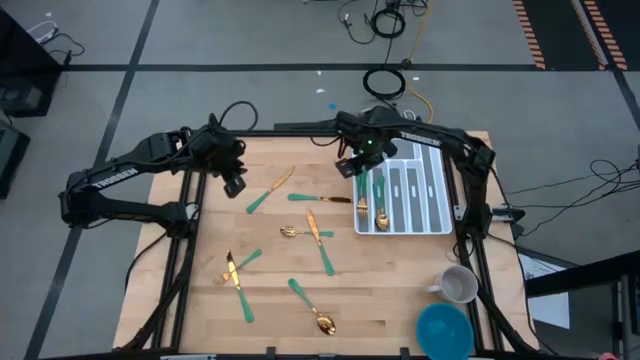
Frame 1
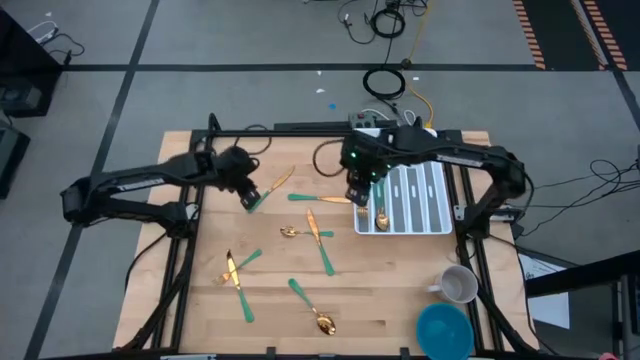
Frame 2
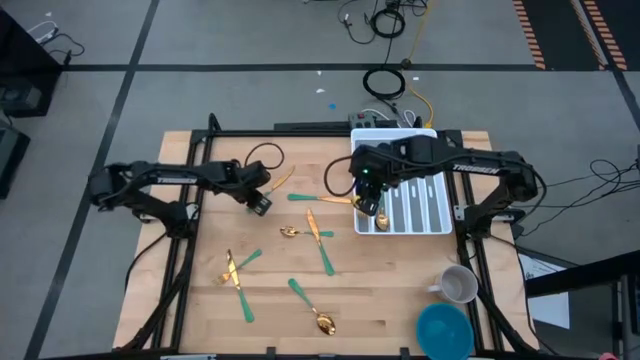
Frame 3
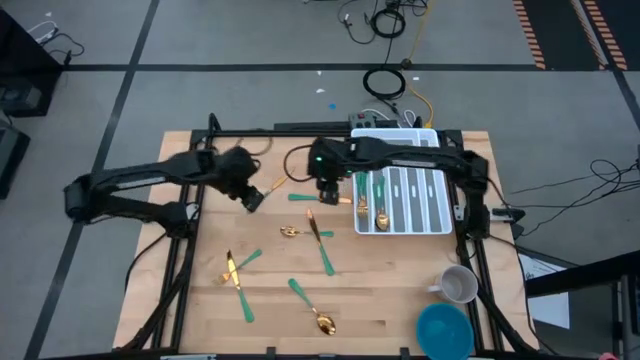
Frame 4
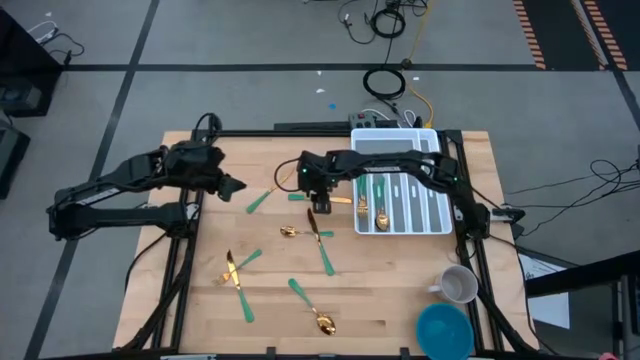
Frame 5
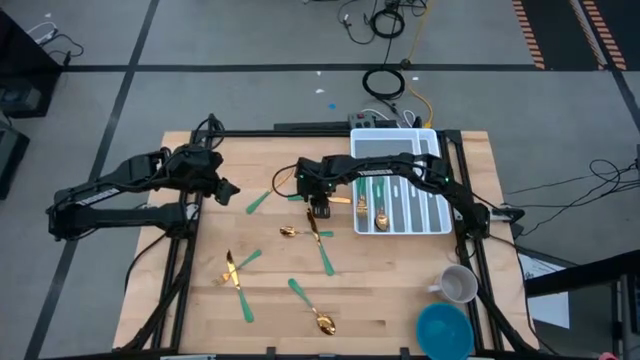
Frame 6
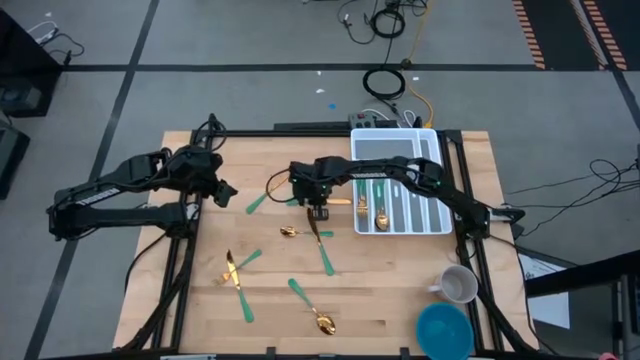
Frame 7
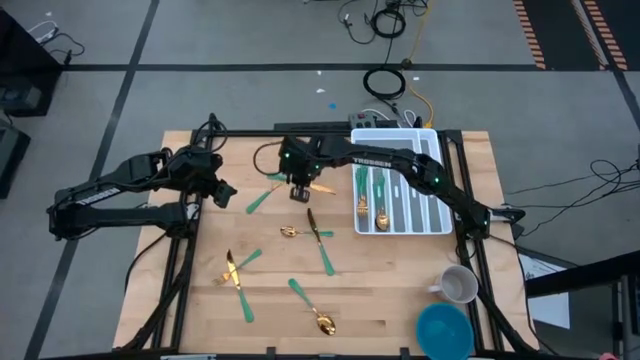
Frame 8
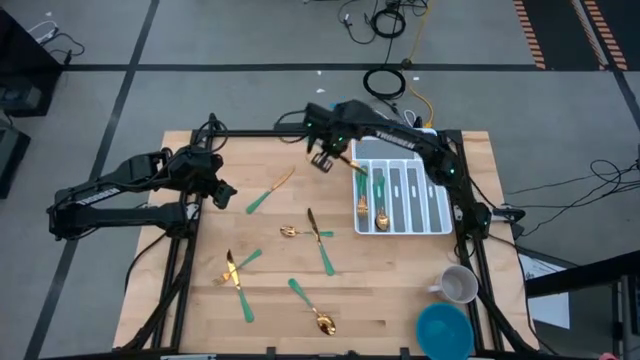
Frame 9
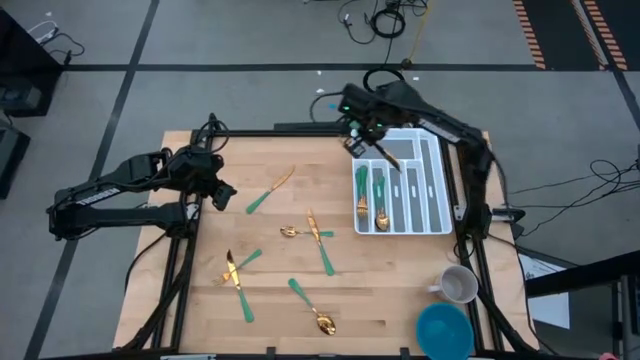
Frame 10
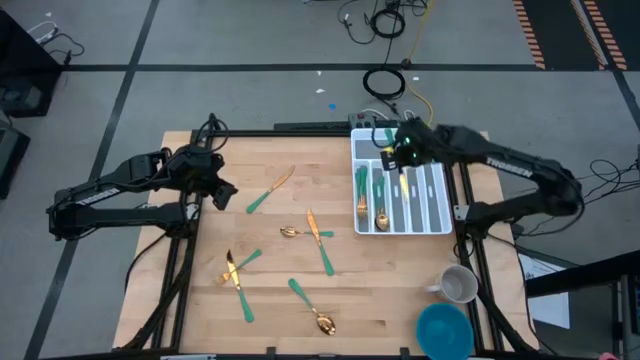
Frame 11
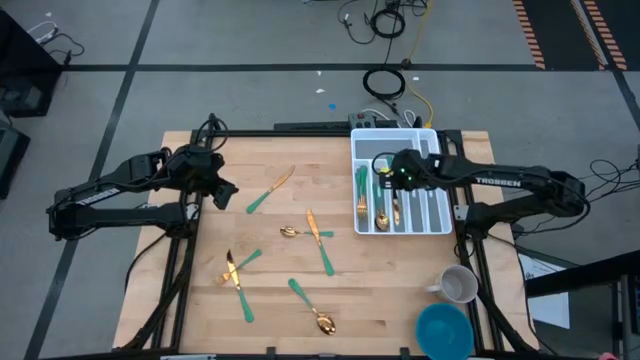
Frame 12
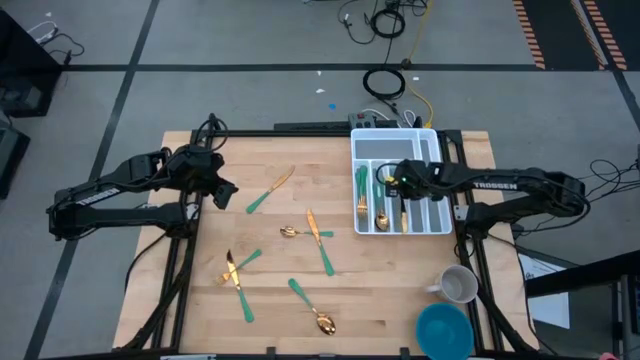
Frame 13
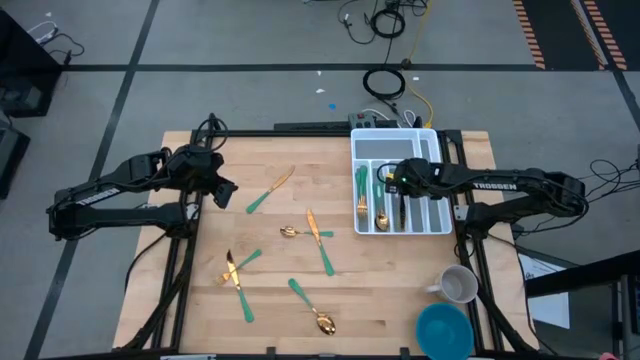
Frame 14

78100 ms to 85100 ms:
Task: Sort silverware
Put the knife into the silverware tray

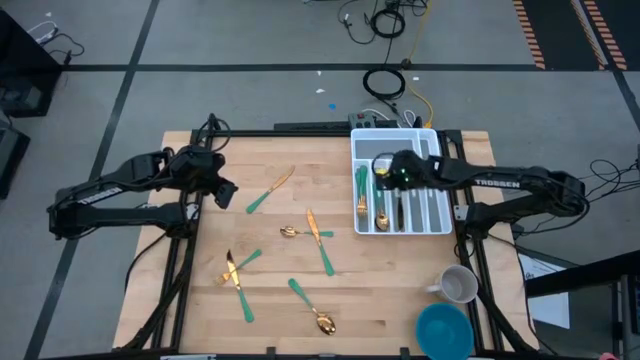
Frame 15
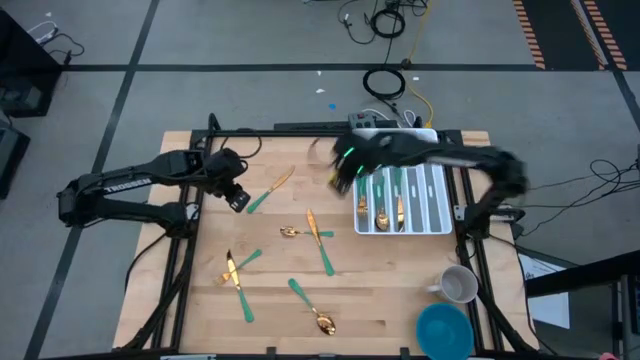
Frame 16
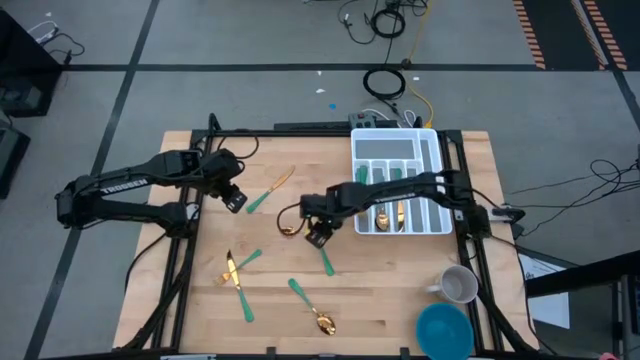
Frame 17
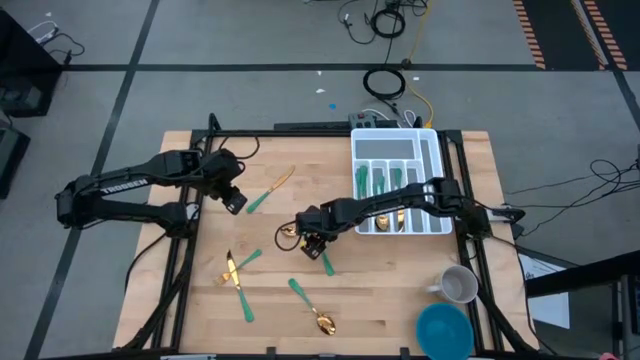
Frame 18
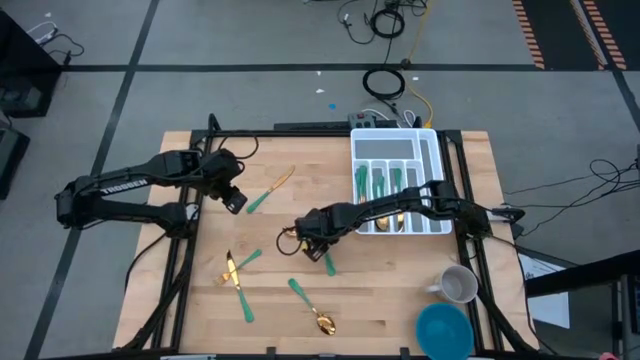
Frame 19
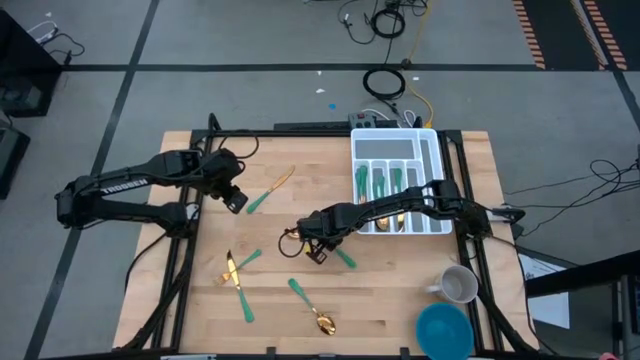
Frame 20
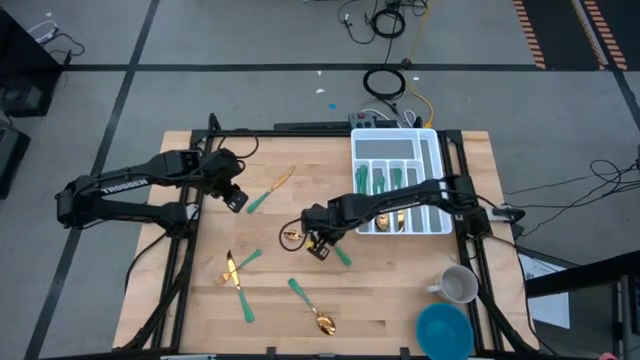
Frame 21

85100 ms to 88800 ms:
Put the knife into the silverware tray

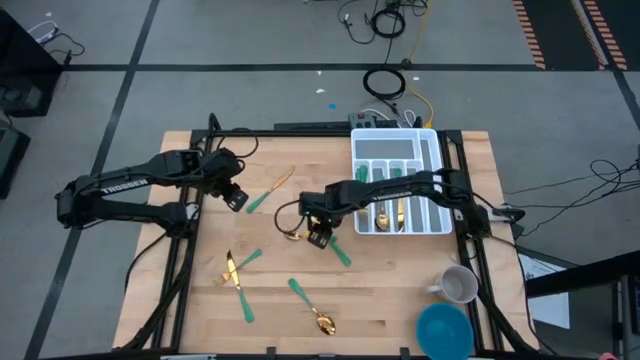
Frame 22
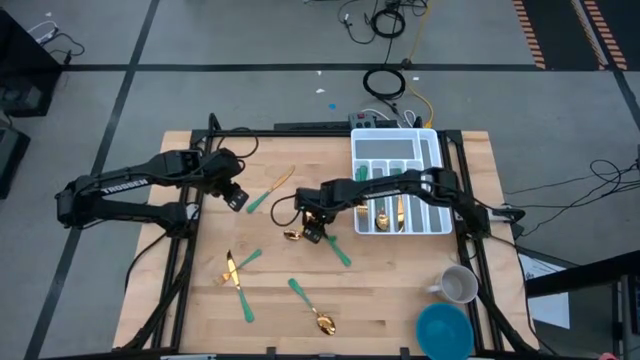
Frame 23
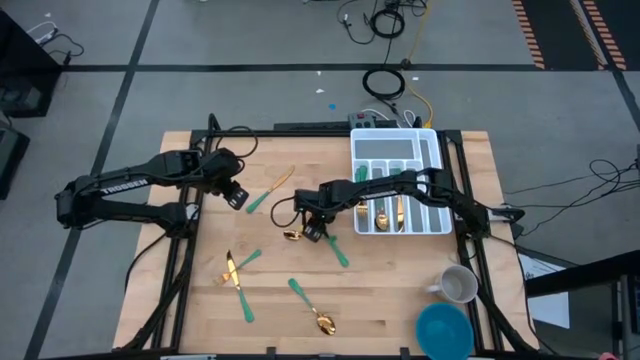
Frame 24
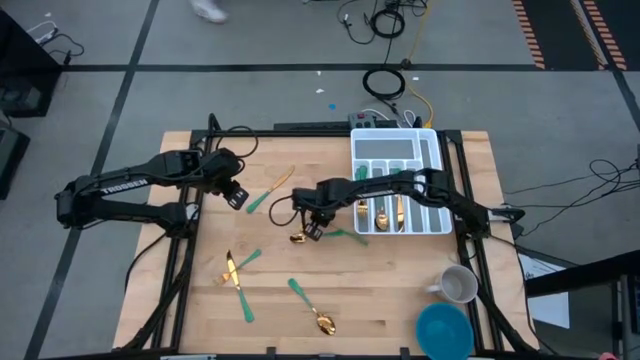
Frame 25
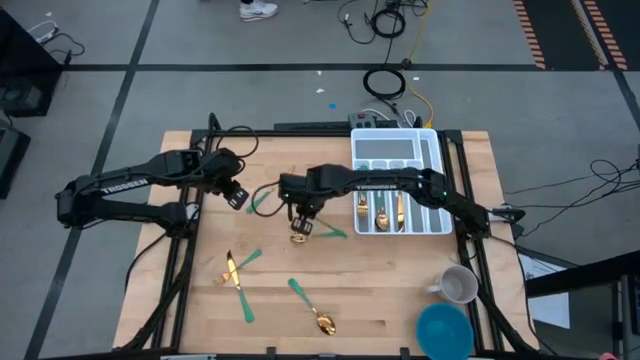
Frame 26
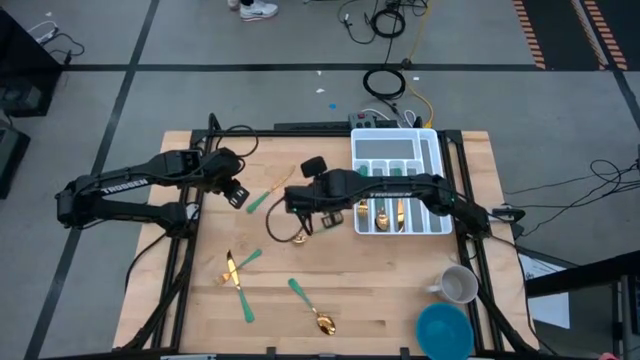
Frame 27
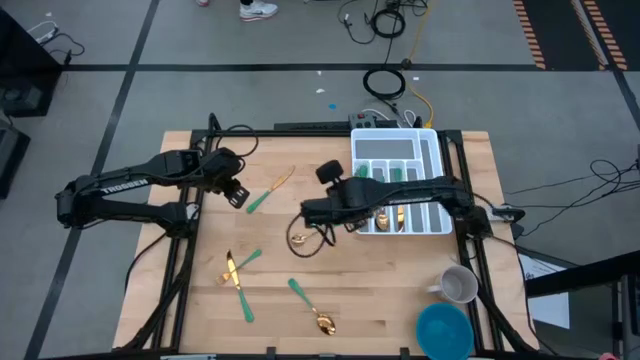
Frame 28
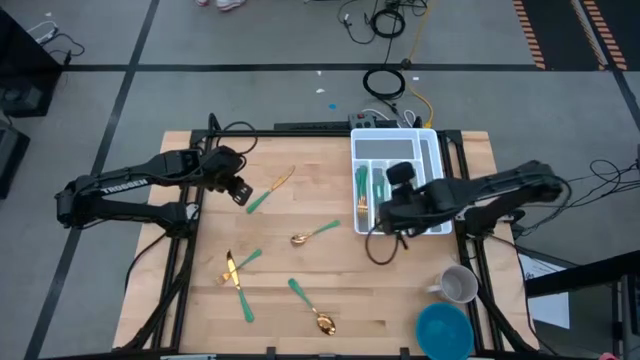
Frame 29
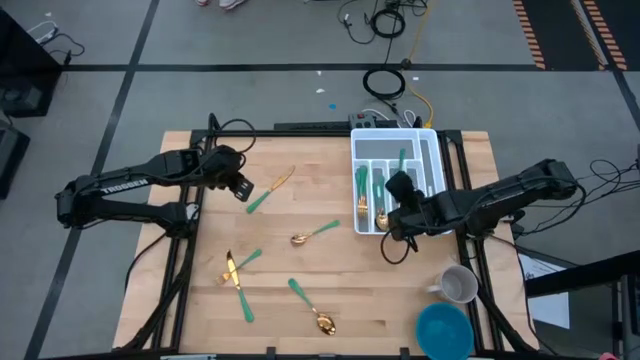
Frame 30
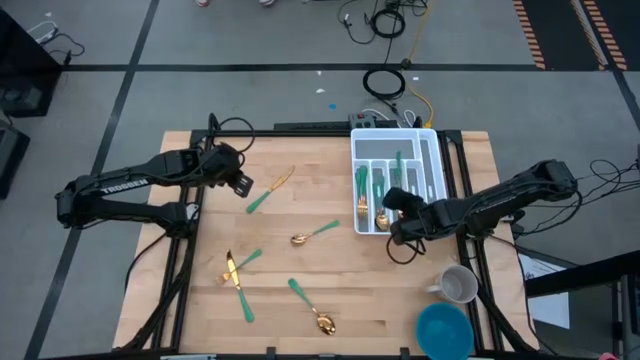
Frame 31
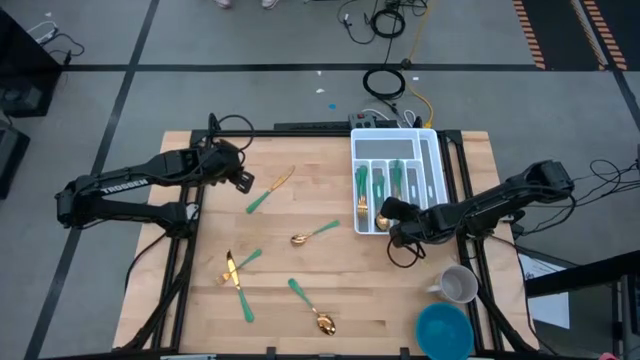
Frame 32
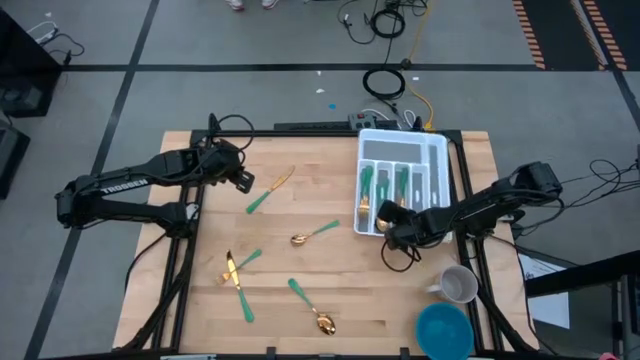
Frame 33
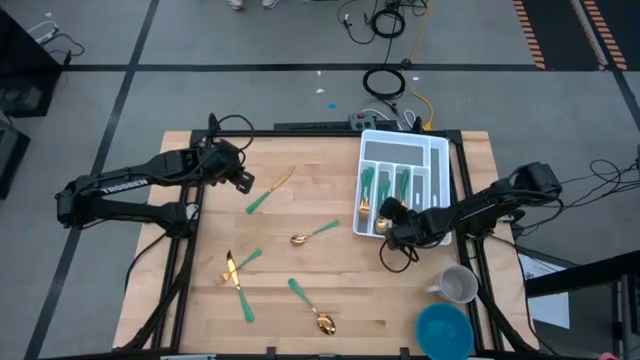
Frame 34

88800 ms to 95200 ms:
Put the knife into the silverware tray

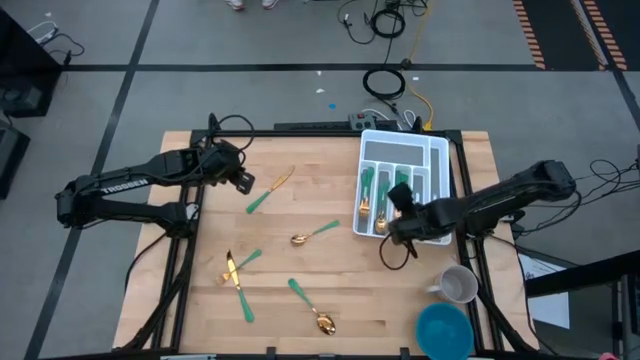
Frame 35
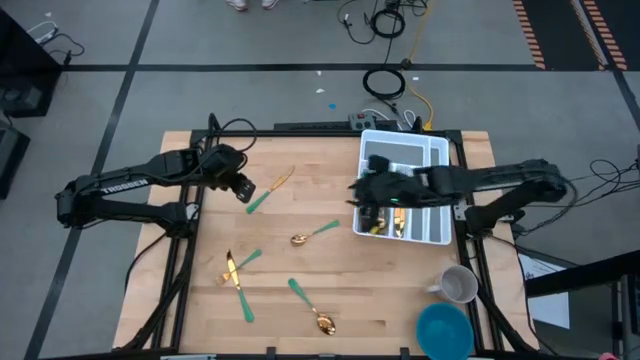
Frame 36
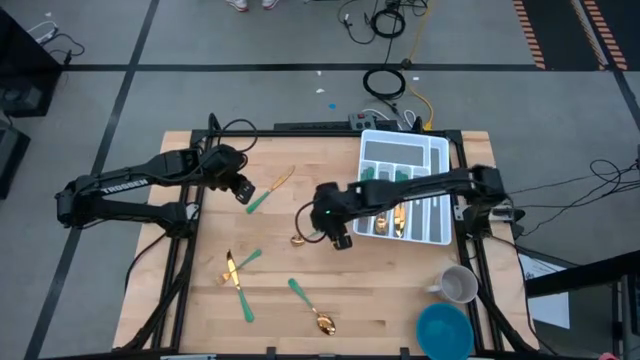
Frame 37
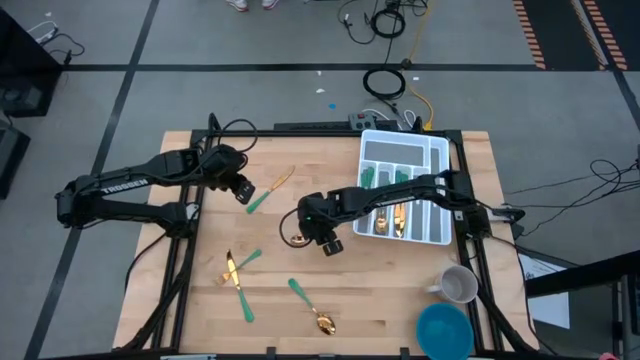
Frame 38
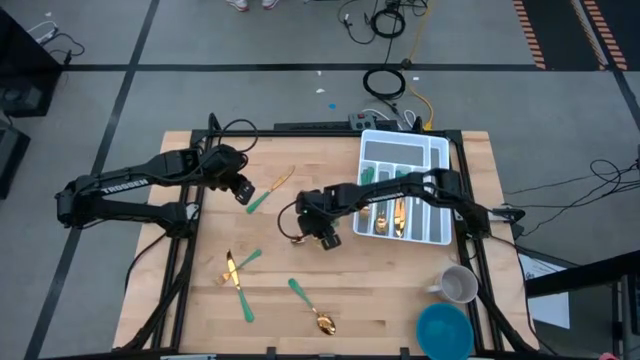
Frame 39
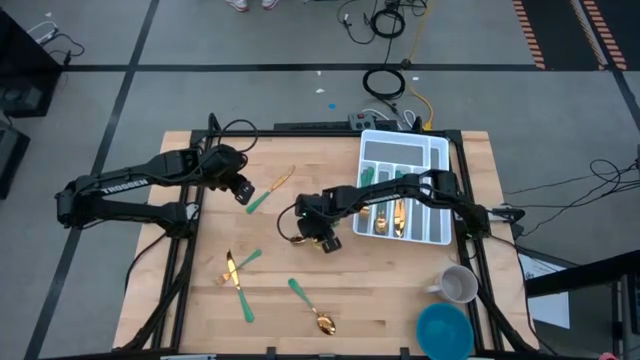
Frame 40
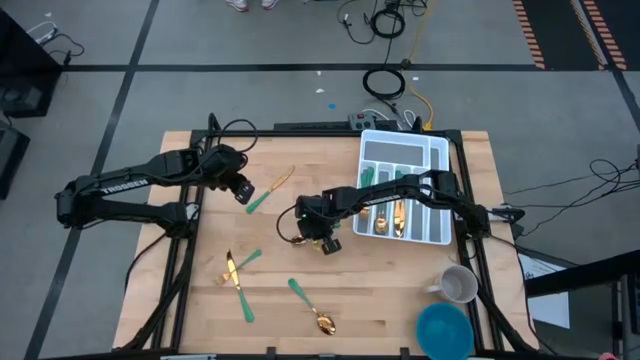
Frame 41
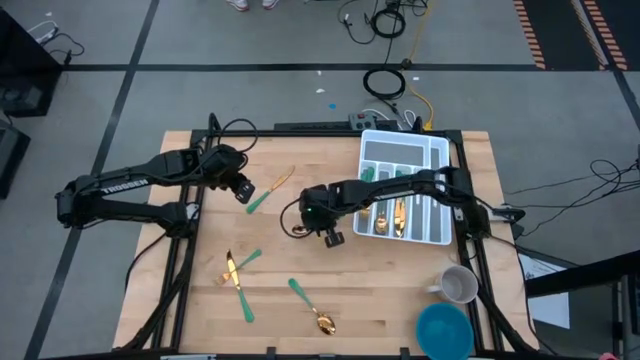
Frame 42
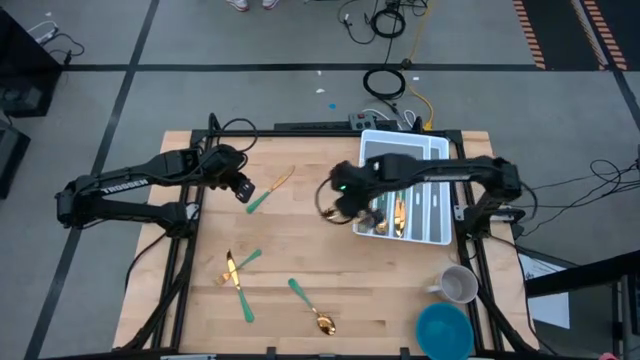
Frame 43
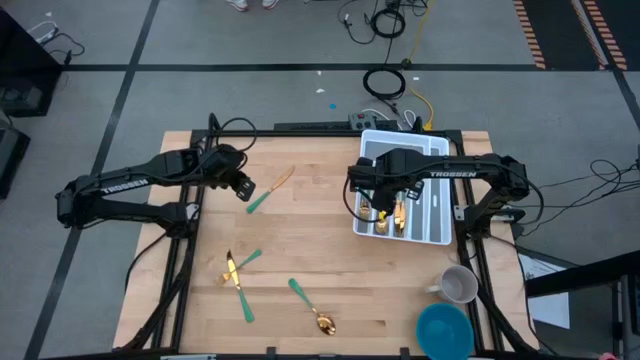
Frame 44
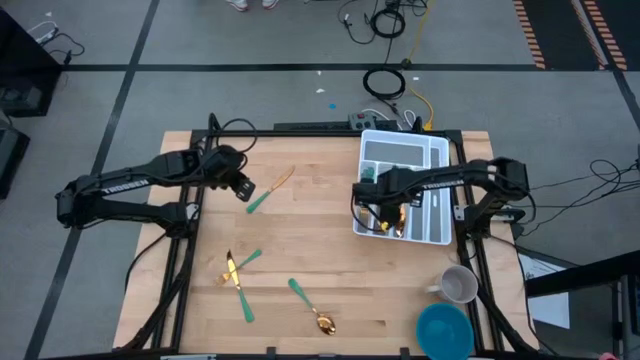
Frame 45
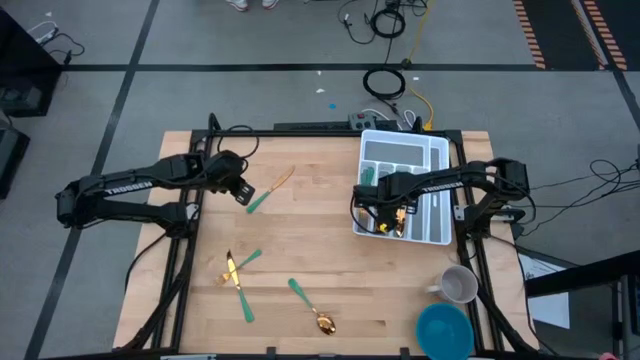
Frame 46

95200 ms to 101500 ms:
Put the spoon into the silverware tray
